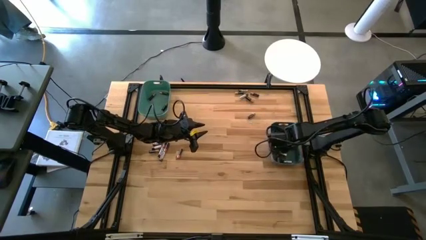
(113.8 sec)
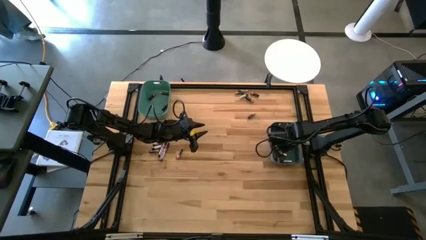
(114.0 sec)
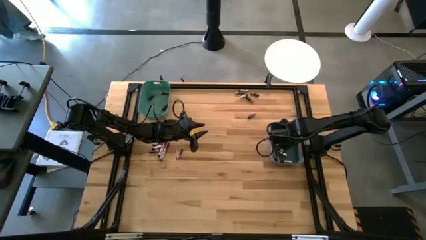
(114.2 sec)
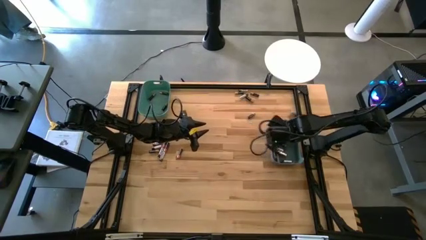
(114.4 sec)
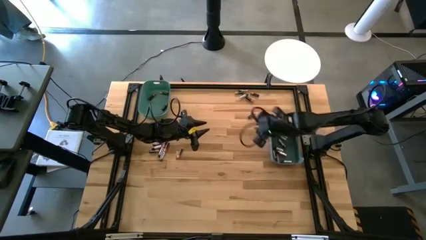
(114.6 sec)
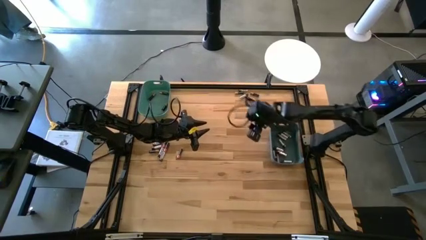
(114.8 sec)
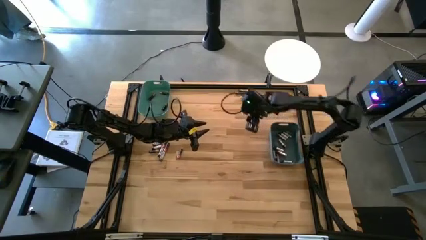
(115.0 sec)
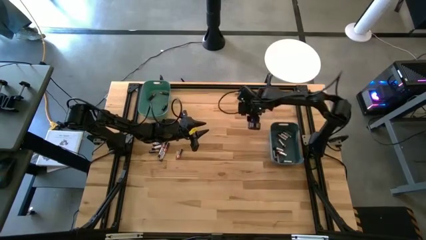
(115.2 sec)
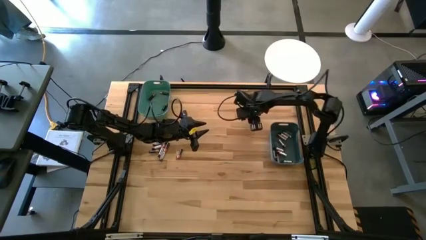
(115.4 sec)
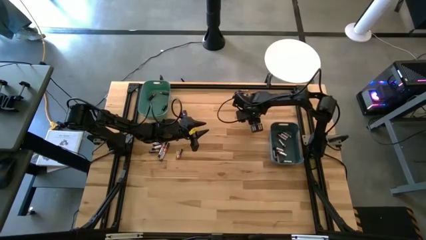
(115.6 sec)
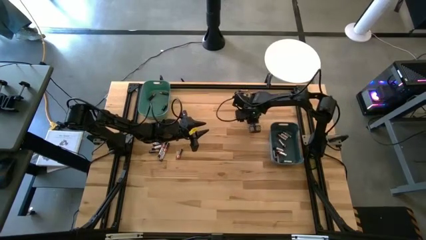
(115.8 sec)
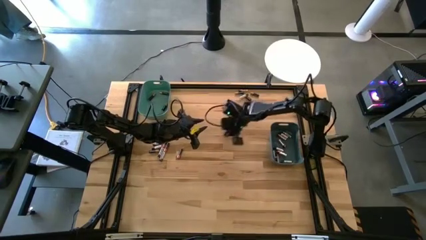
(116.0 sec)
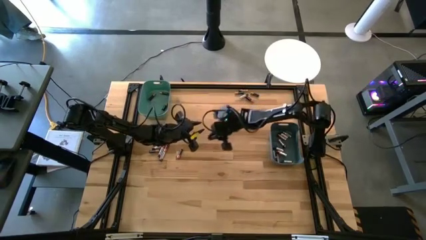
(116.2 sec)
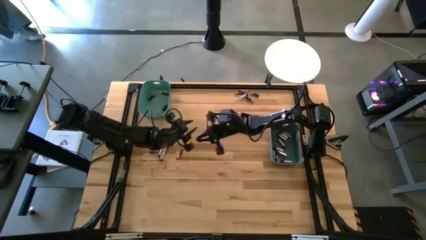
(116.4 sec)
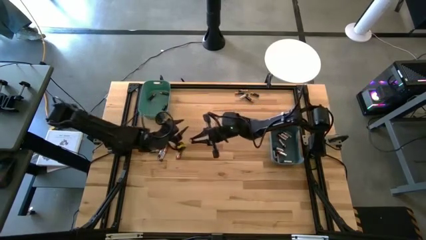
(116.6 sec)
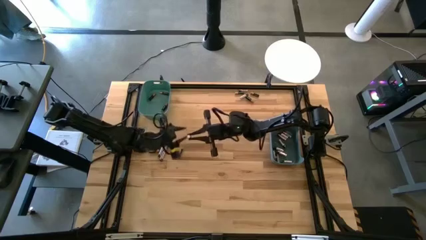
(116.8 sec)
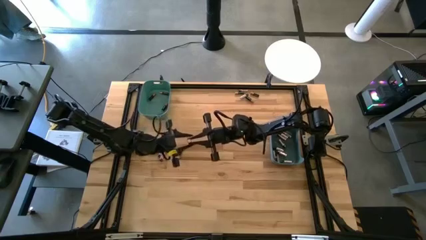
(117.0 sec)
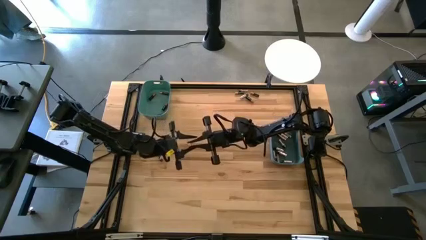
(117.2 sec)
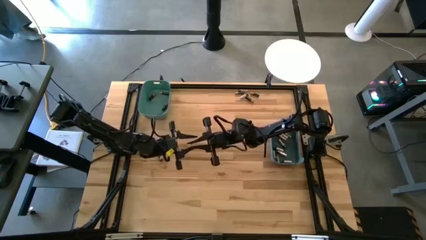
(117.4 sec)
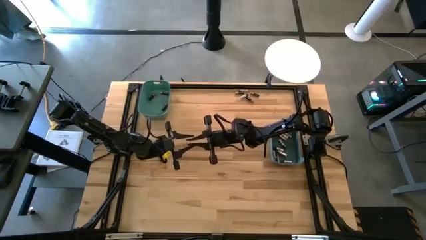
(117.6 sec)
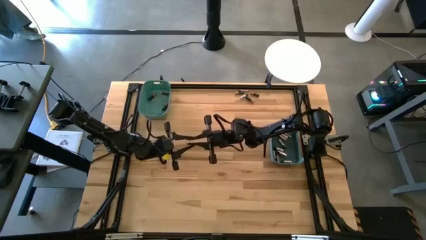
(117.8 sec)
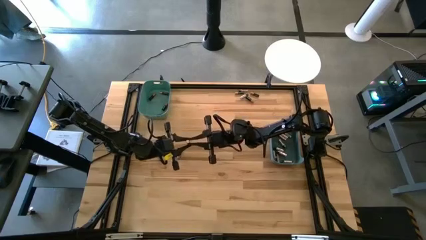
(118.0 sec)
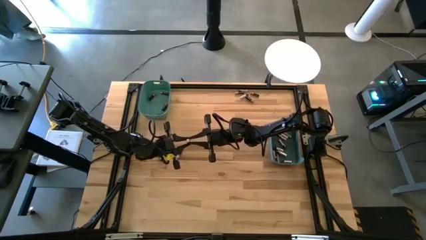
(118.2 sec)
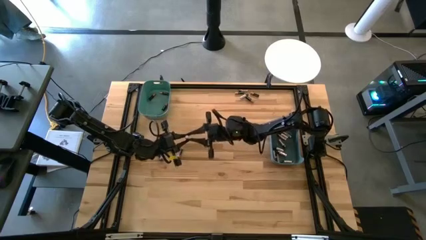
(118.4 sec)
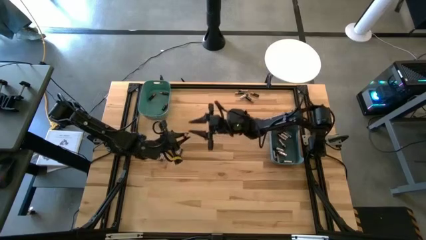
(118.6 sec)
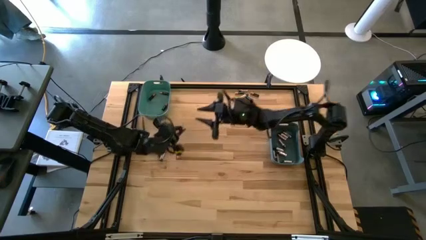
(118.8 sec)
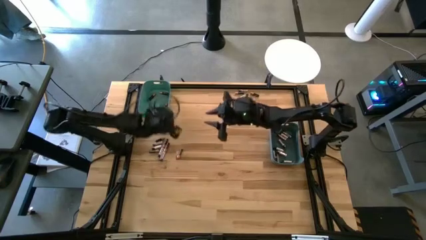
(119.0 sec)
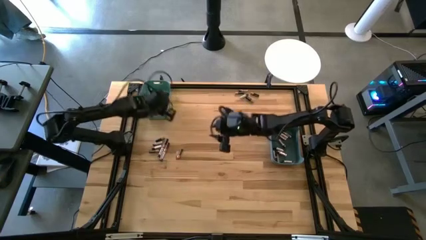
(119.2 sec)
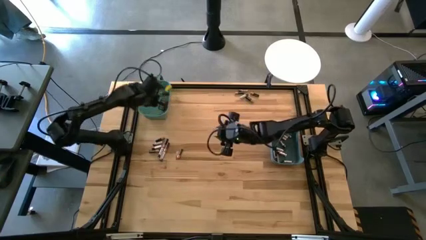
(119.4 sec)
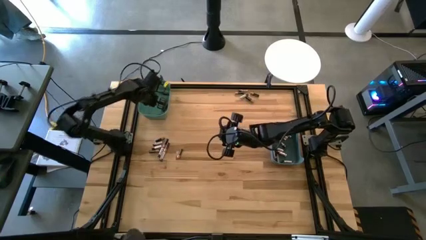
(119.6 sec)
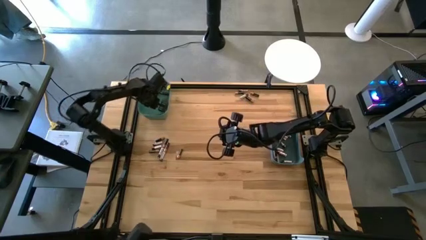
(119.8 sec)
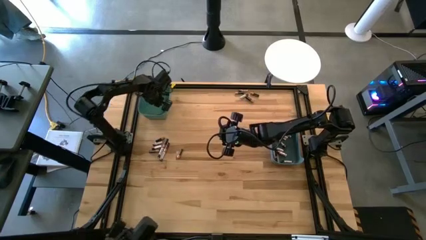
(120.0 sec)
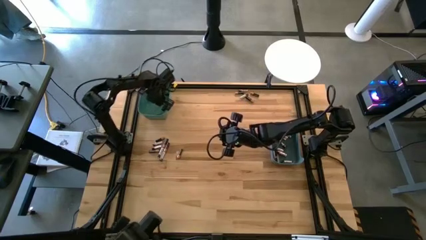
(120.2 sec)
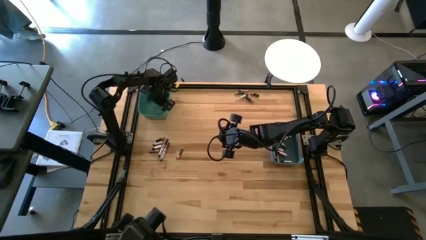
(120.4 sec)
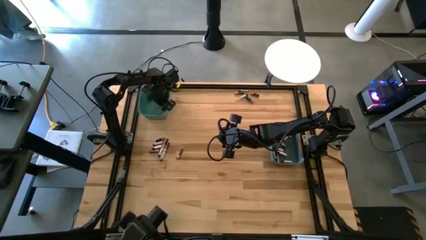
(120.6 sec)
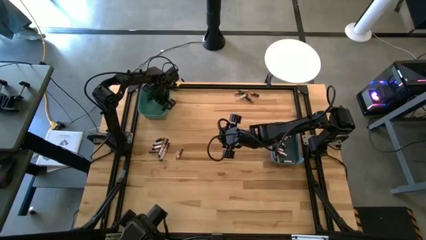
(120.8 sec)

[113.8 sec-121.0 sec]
Task: Sort batteries
Put the black battery into the green bin

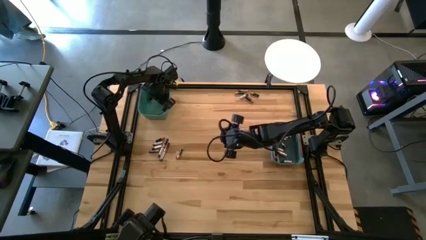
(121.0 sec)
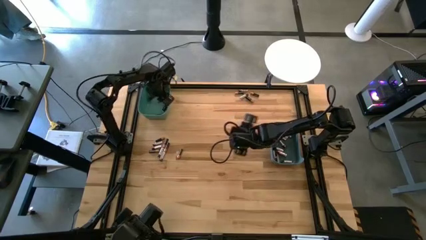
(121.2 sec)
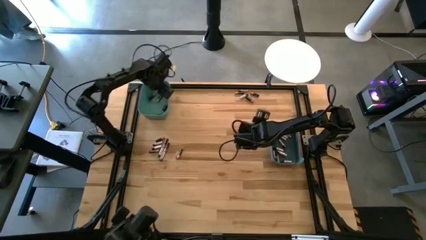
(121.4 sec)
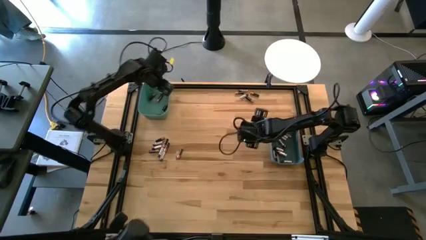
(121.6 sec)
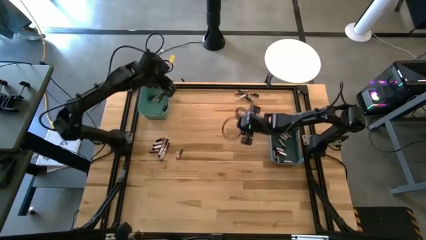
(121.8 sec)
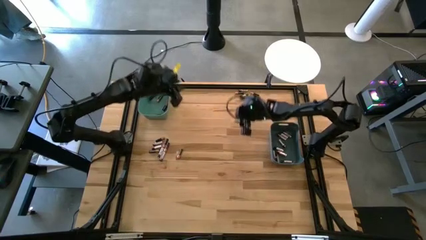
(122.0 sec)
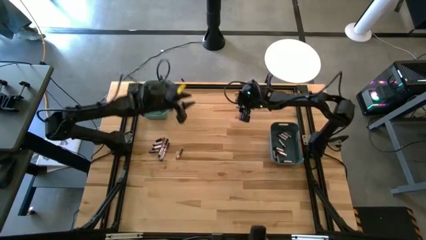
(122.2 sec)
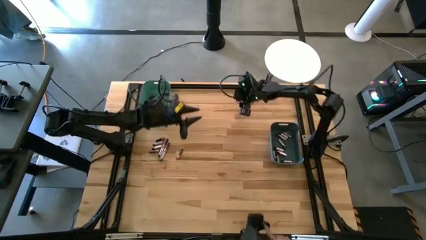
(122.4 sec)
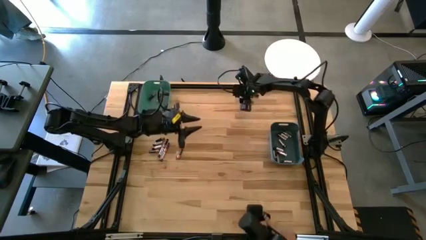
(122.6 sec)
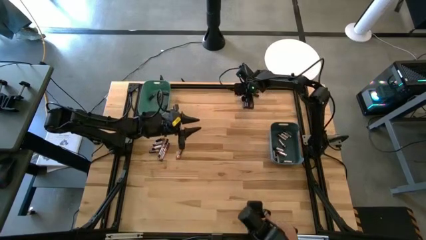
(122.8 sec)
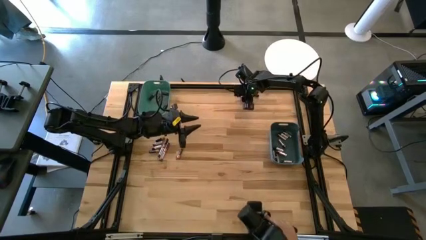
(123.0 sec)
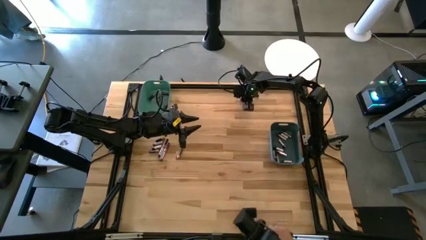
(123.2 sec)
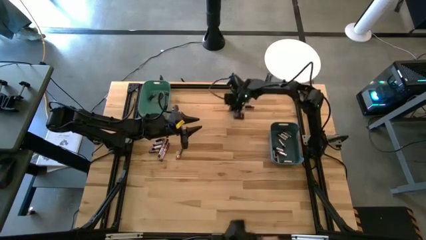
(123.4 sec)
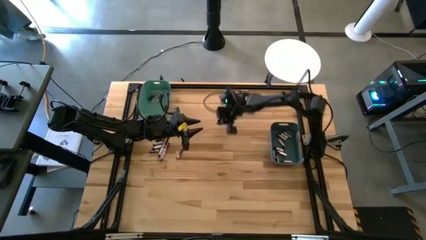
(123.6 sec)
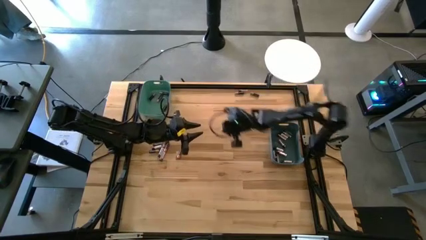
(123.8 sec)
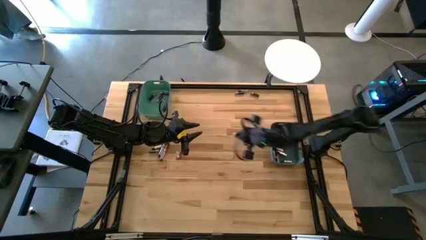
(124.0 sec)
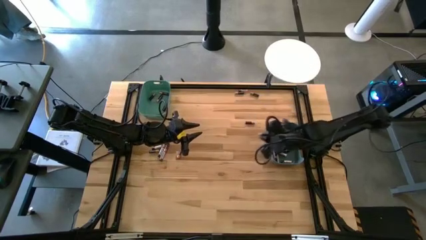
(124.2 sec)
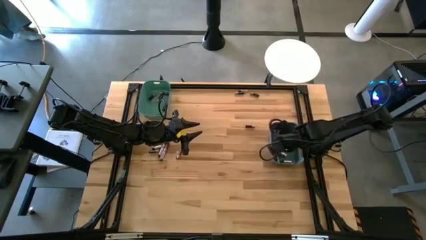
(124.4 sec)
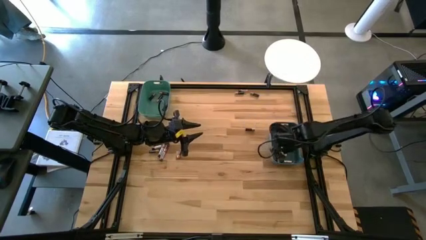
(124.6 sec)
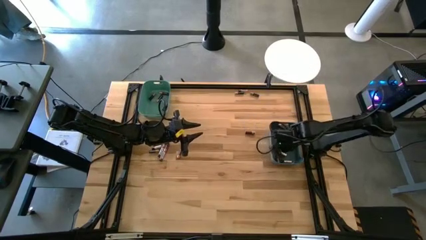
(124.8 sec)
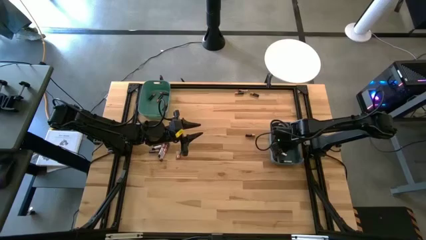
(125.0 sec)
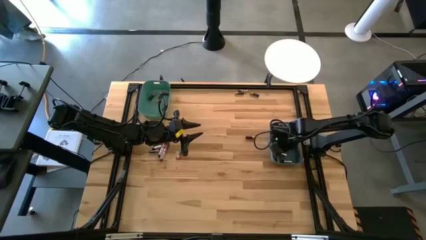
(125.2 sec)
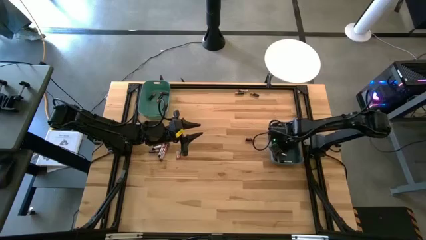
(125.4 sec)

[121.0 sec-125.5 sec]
Put the silver battery into the blue bin

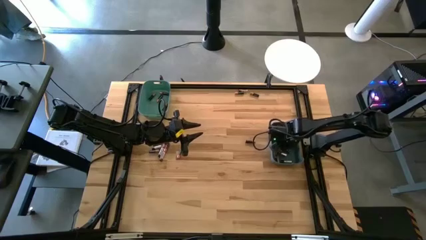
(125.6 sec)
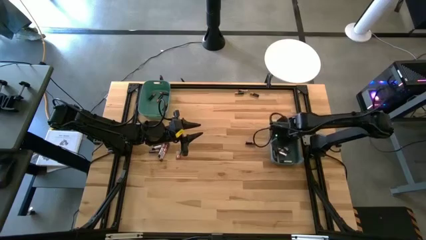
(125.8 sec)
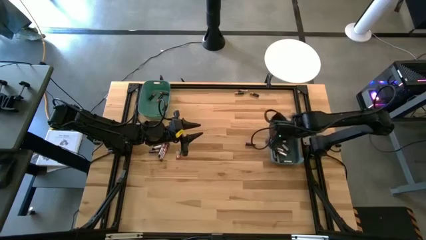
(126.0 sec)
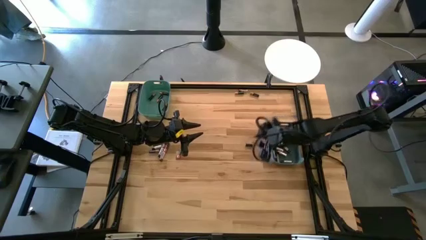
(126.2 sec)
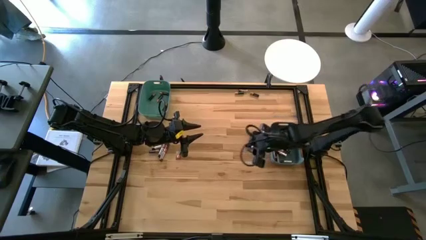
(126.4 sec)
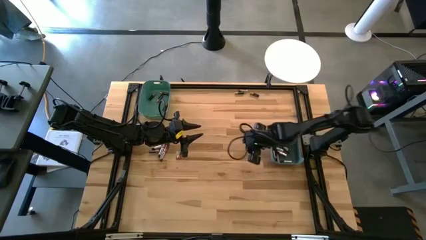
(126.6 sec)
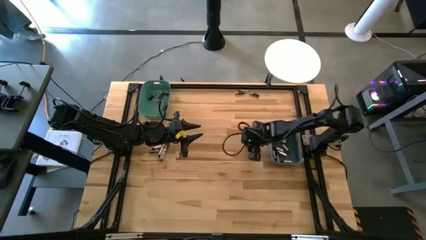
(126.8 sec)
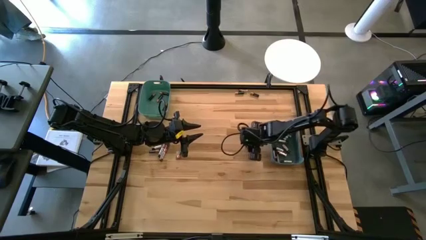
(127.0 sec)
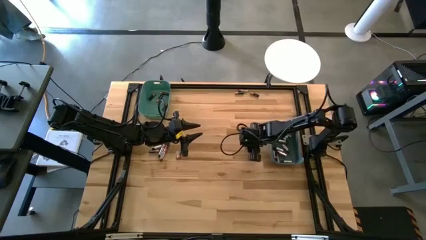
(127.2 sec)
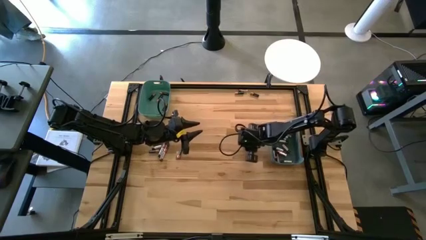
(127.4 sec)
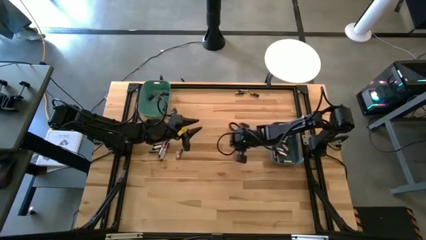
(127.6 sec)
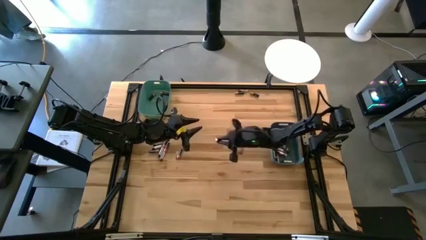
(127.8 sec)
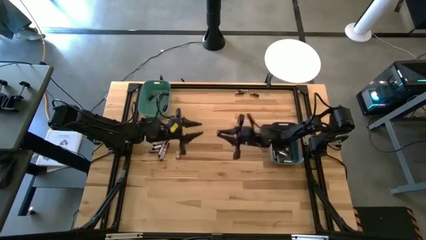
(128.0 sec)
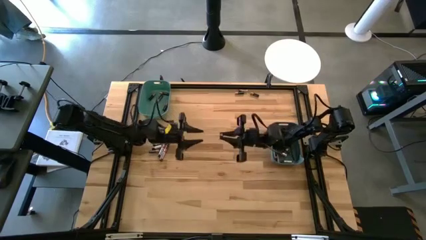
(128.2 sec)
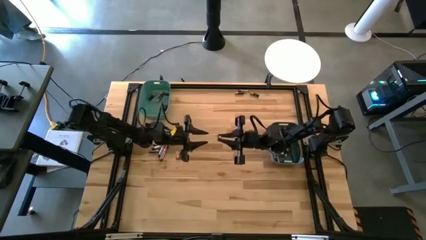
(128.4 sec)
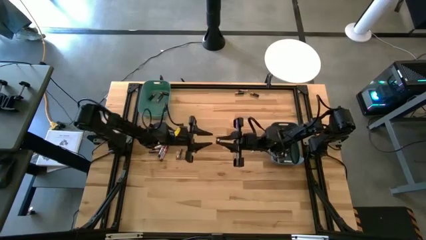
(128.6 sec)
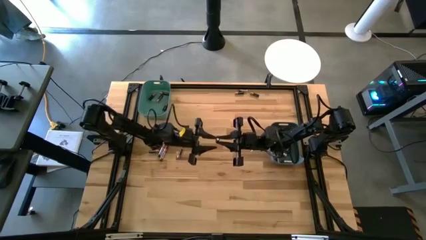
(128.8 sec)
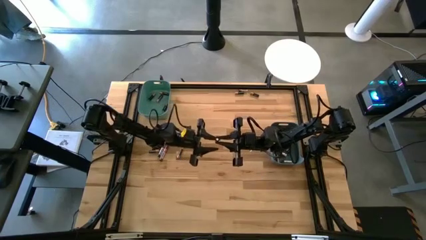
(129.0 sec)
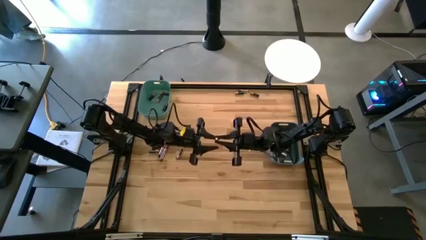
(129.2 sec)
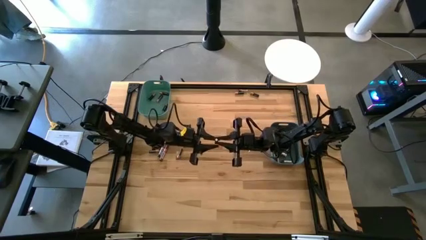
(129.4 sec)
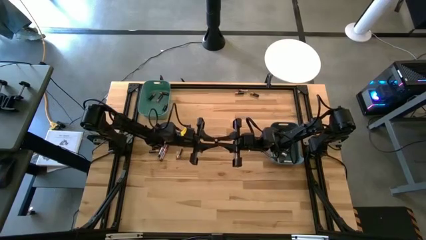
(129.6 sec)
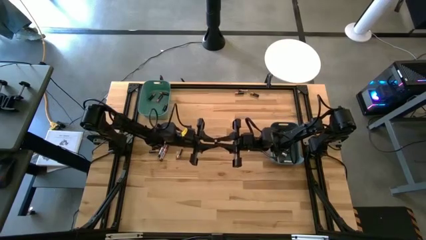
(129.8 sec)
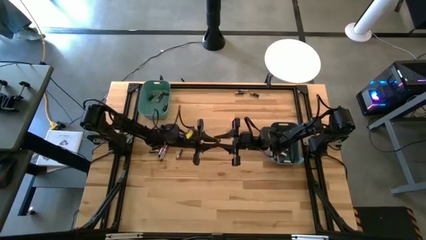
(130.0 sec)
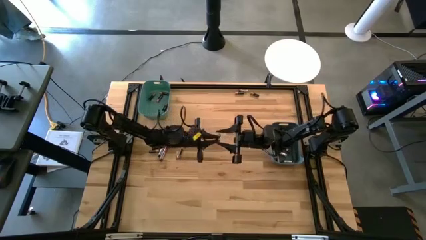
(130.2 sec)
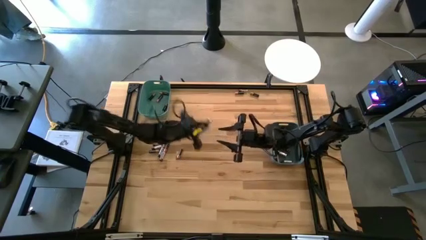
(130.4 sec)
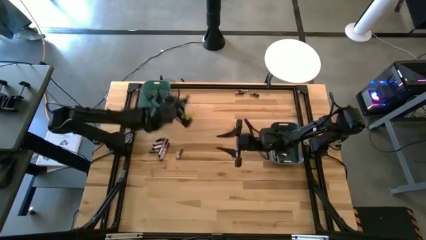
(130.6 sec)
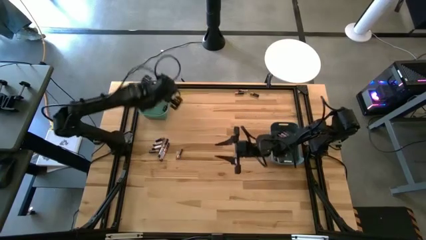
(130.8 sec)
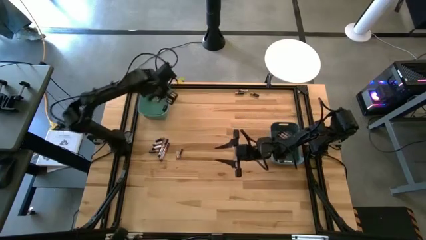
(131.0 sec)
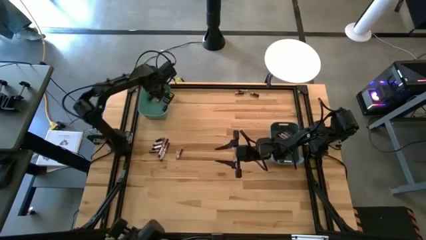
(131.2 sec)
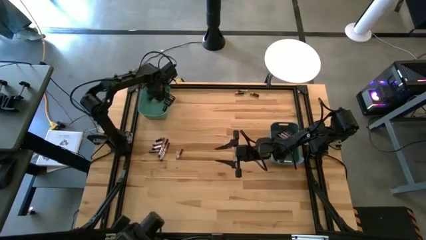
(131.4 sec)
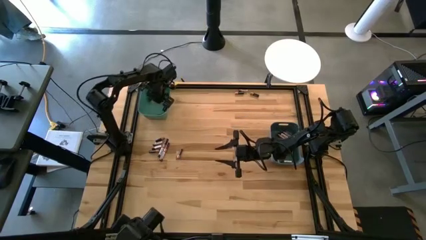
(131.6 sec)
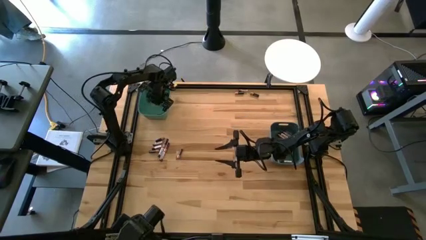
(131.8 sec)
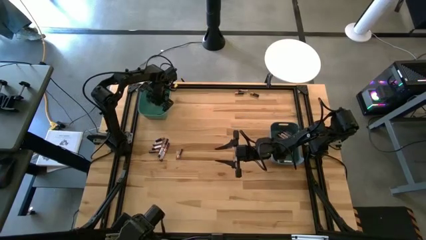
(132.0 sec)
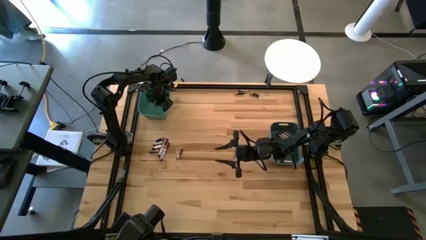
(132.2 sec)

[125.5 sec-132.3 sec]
Put the black battery into the green bin
